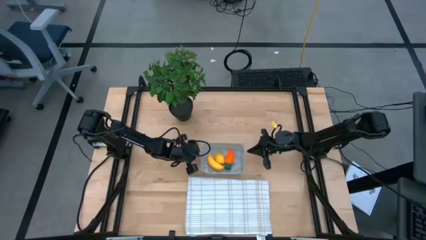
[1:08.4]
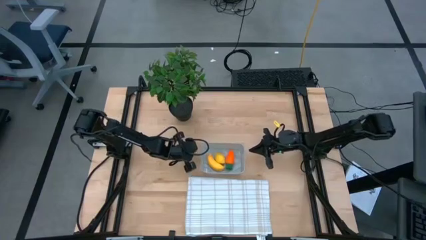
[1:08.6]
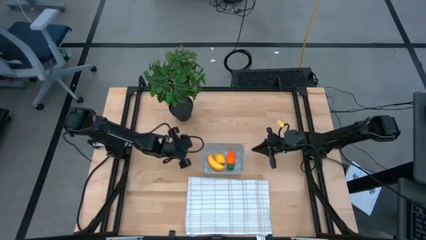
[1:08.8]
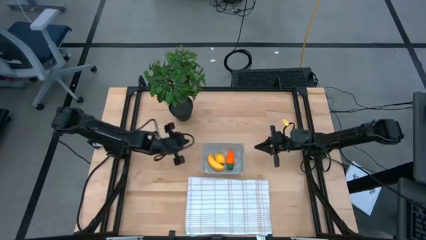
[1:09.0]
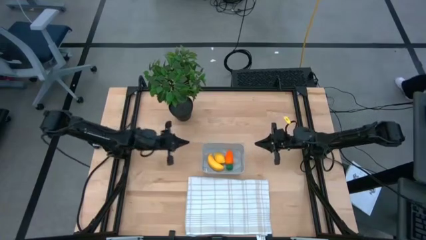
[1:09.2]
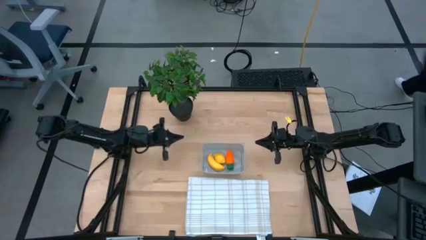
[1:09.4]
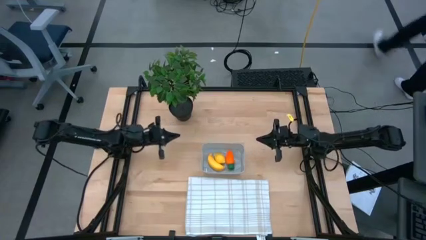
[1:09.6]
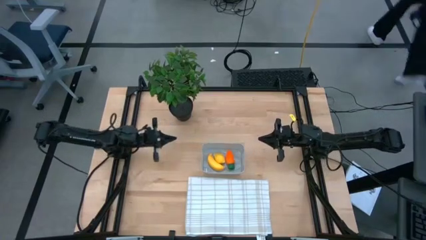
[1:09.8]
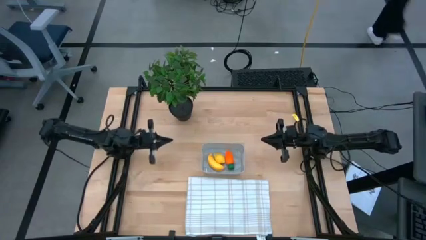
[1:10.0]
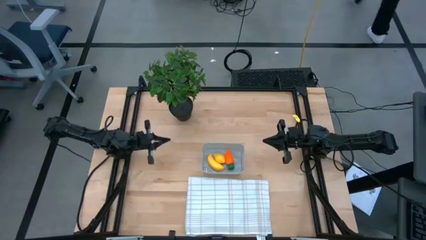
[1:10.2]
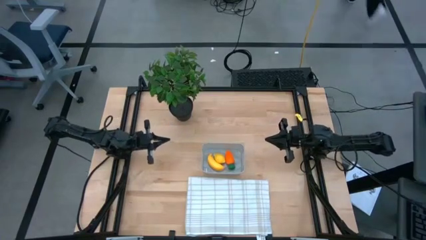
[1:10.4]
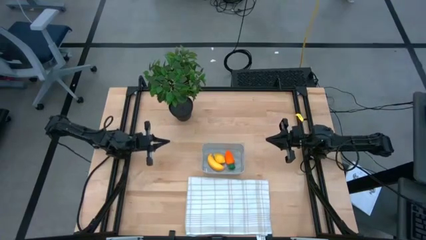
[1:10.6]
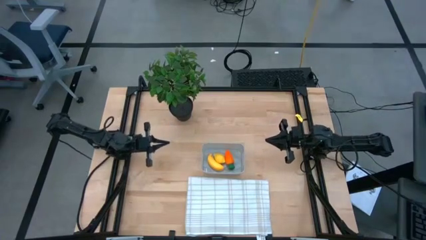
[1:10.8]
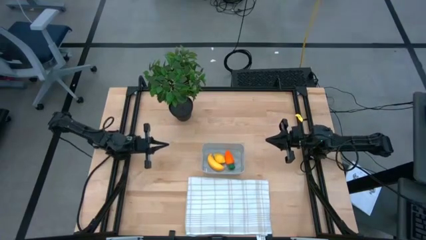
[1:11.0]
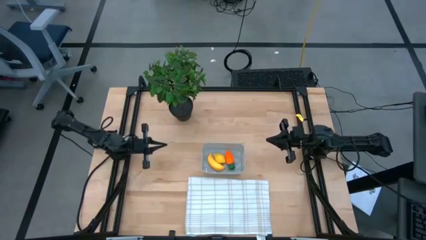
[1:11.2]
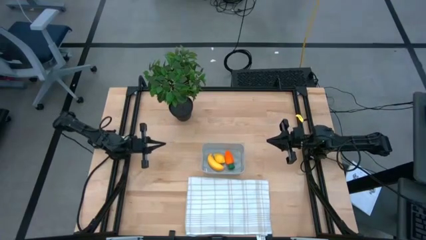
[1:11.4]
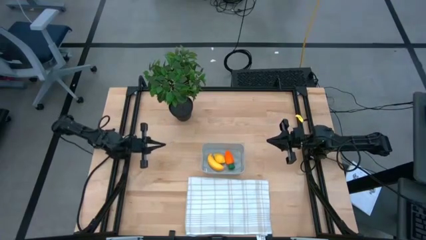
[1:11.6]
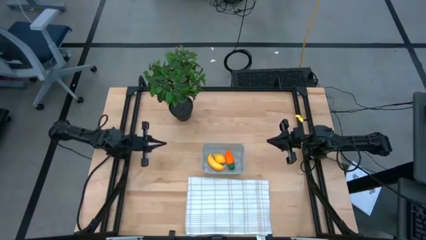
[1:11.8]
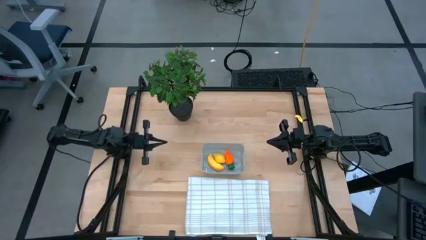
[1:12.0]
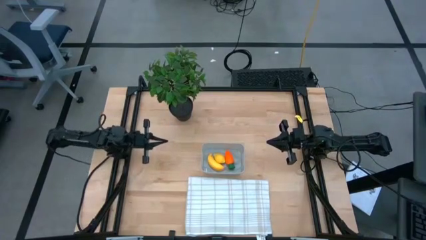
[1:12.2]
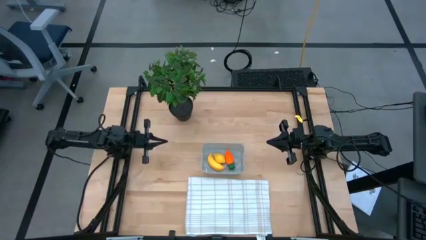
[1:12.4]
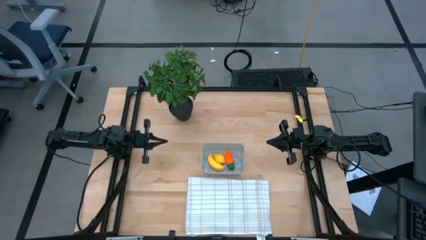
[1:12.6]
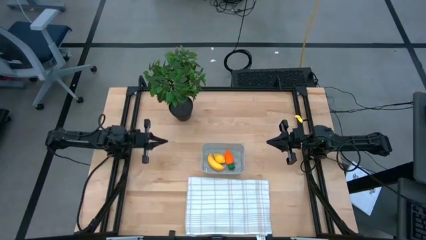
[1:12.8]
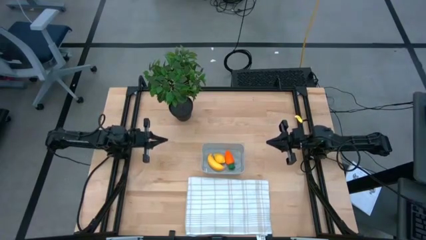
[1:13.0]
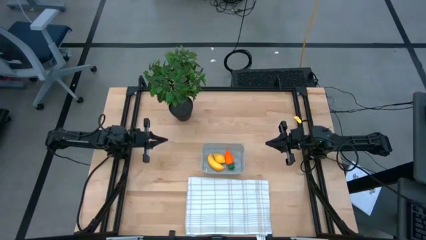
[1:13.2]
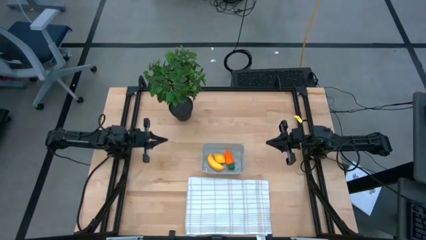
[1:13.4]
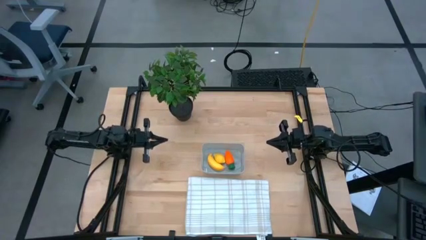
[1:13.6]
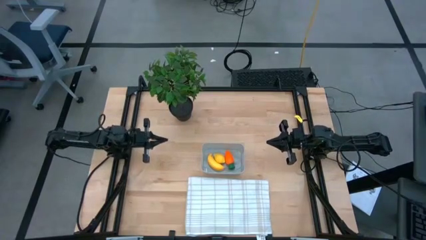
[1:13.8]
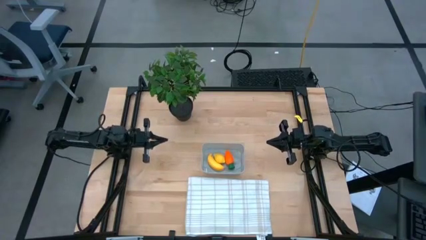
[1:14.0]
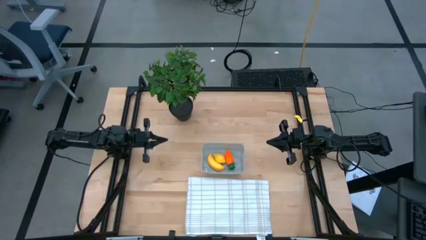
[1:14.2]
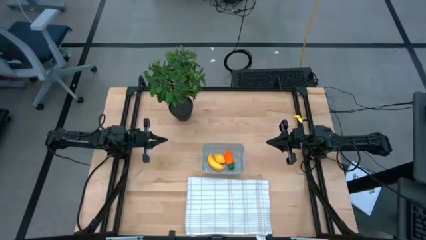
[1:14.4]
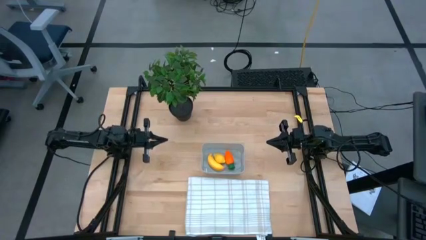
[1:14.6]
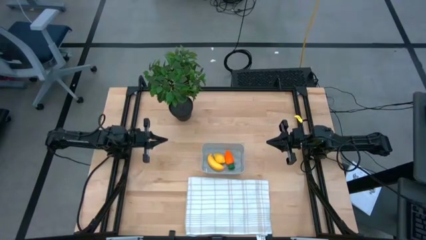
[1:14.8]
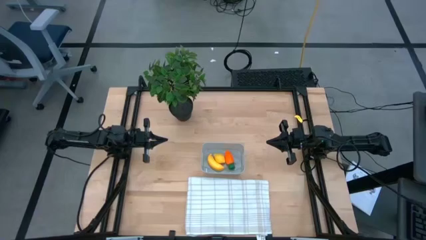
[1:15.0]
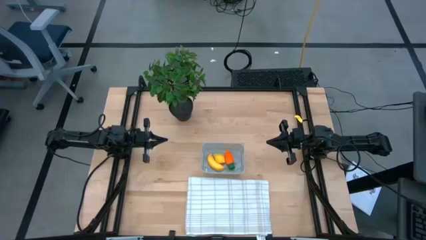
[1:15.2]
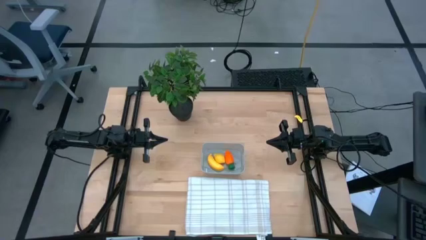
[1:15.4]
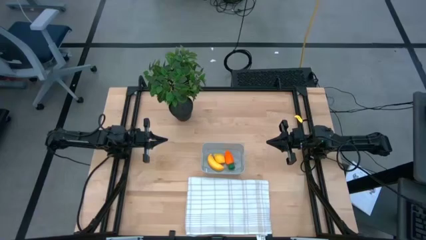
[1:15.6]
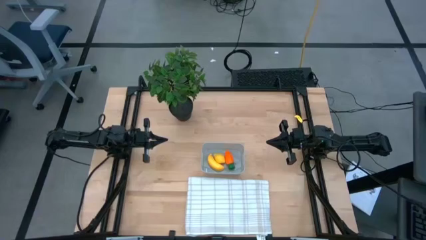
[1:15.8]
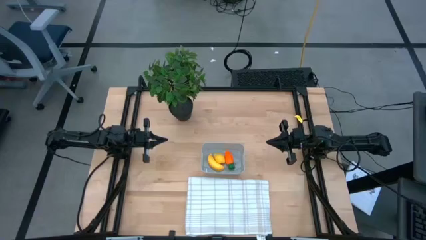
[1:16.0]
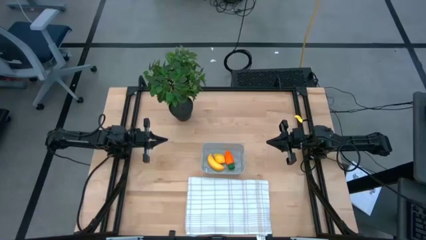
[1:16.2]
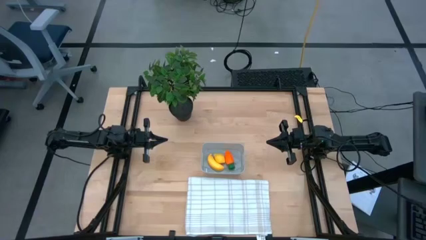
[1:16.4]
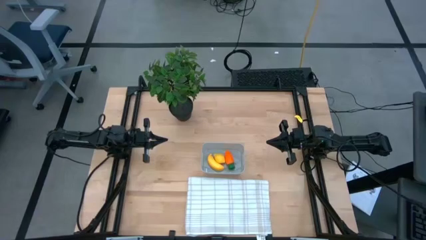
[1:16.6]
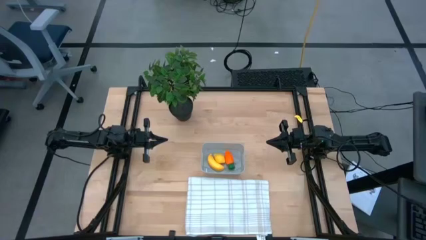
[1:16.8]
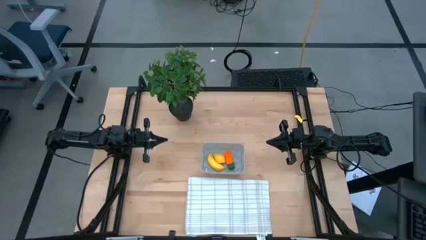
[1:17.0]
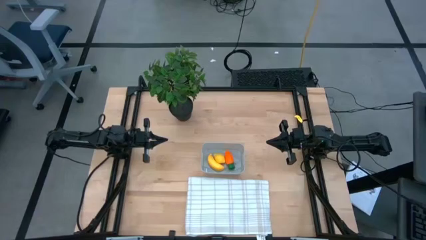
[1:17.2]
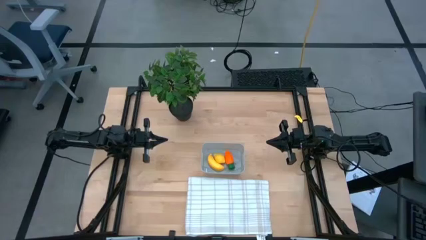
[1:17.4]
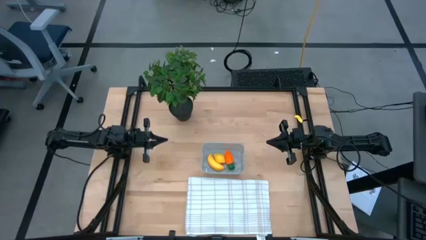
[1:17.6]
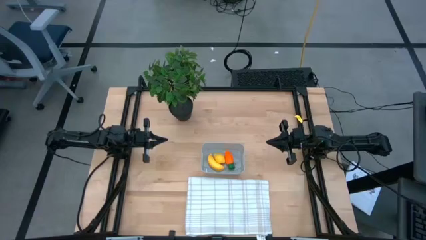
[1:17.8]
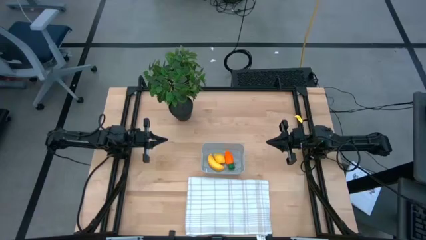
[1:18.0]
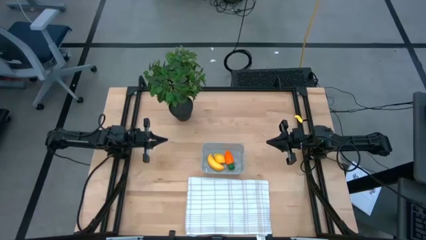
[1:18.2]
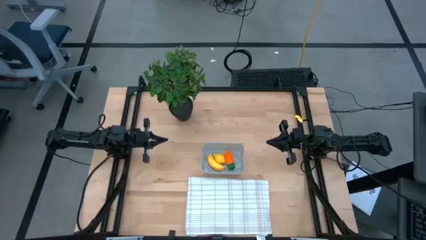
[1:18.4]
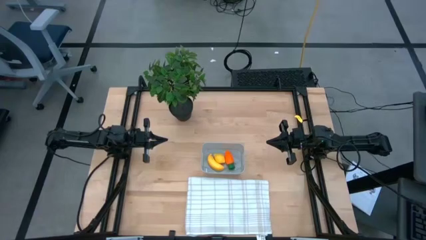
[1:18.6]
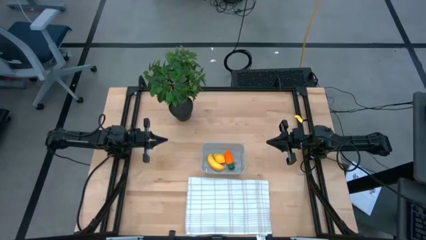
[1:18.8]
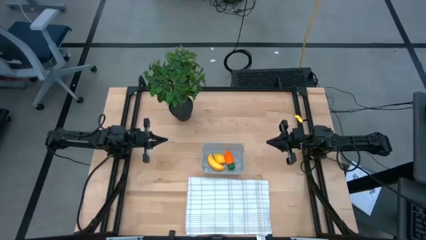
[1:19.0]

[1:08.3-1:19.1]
Task: Pick and placing Produce into tupperware
Return to Home Position

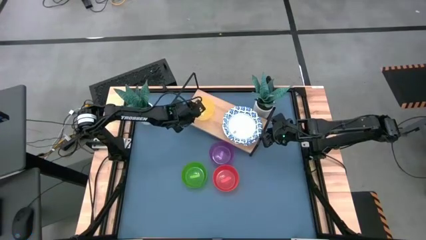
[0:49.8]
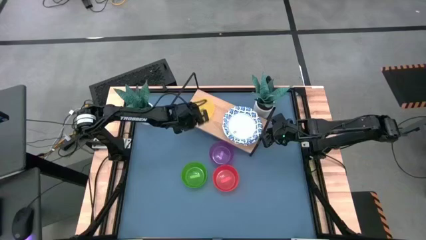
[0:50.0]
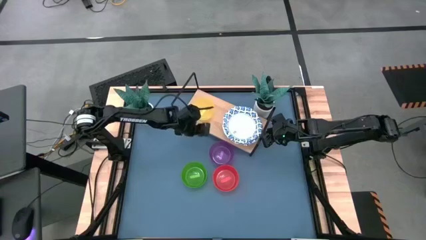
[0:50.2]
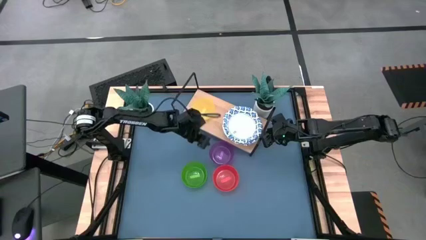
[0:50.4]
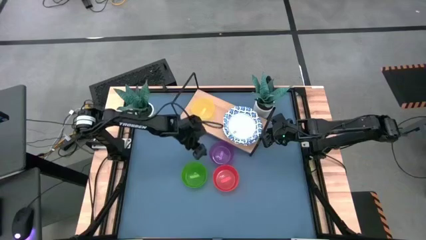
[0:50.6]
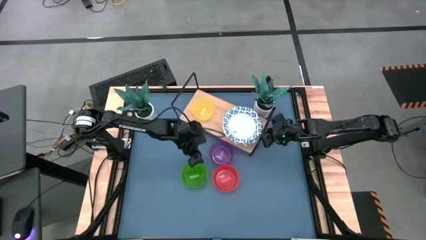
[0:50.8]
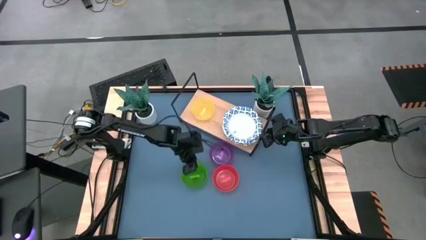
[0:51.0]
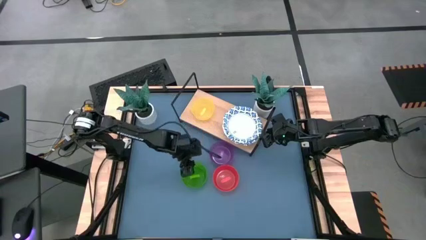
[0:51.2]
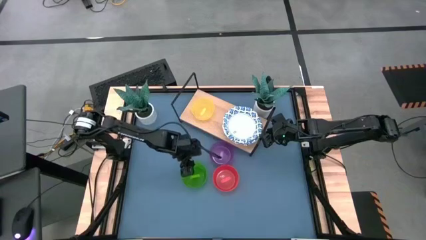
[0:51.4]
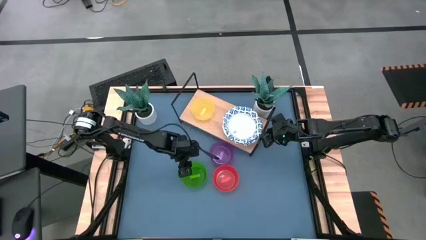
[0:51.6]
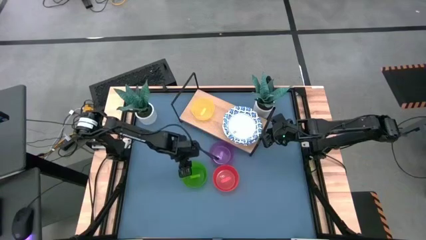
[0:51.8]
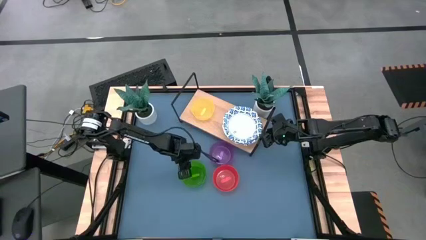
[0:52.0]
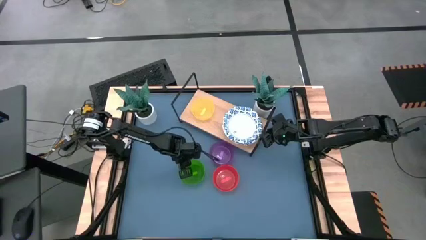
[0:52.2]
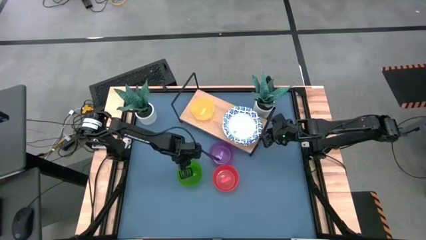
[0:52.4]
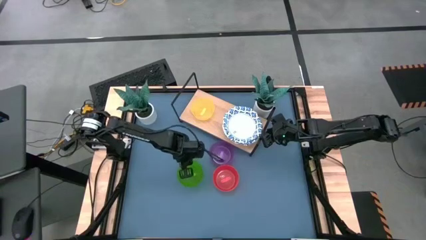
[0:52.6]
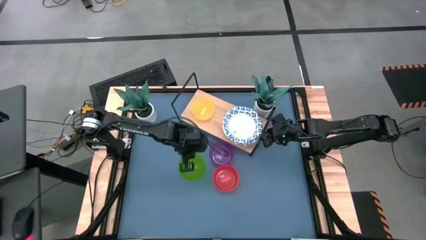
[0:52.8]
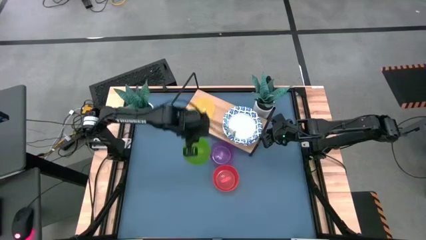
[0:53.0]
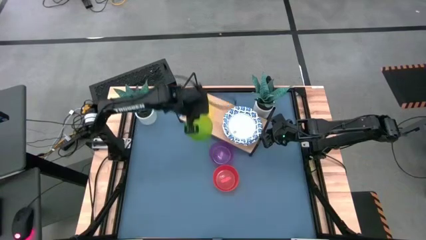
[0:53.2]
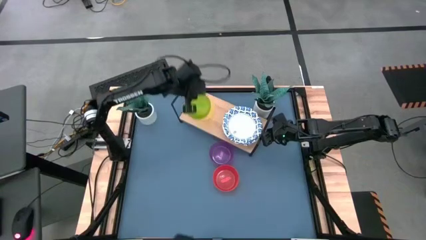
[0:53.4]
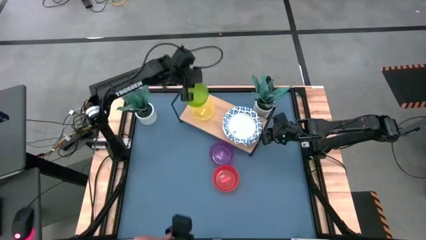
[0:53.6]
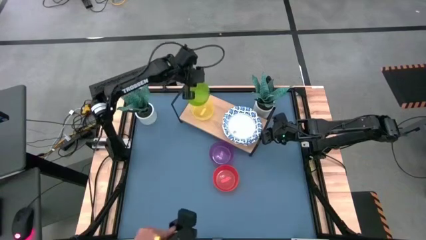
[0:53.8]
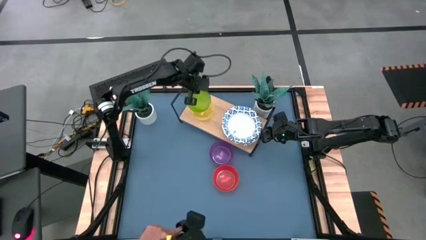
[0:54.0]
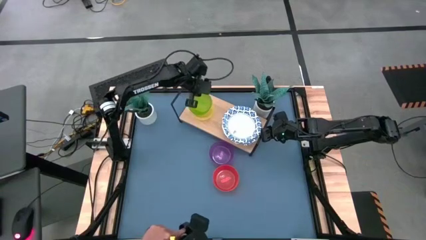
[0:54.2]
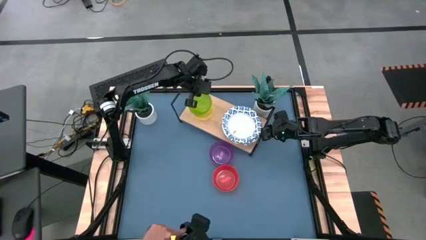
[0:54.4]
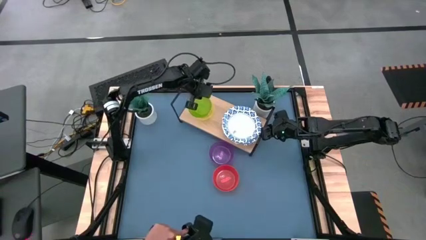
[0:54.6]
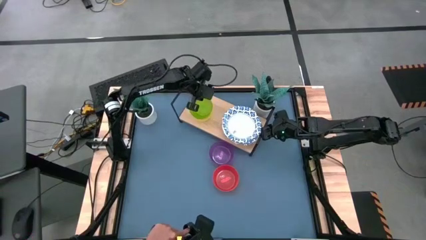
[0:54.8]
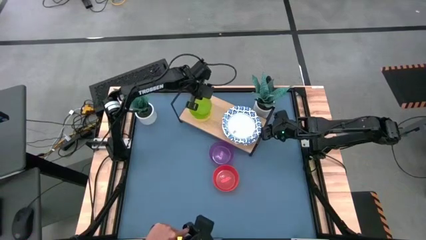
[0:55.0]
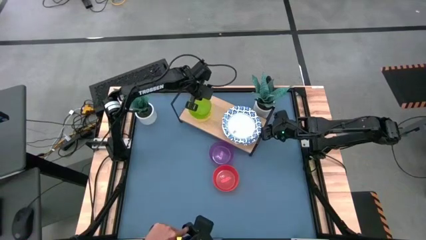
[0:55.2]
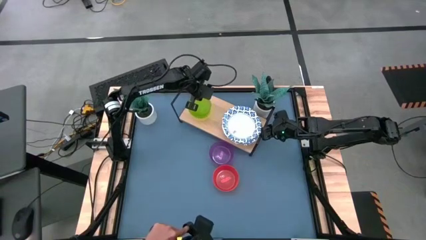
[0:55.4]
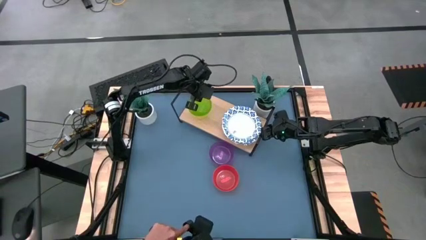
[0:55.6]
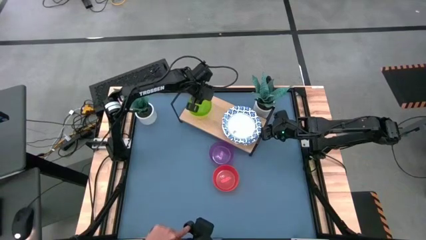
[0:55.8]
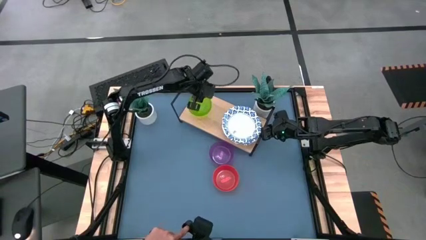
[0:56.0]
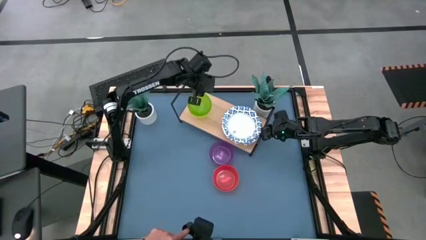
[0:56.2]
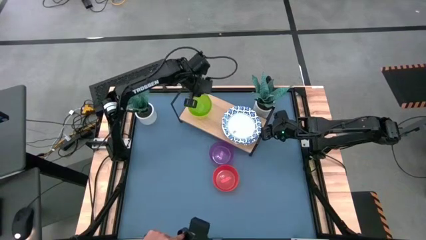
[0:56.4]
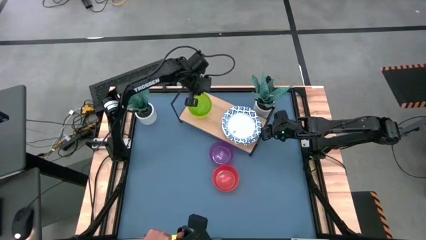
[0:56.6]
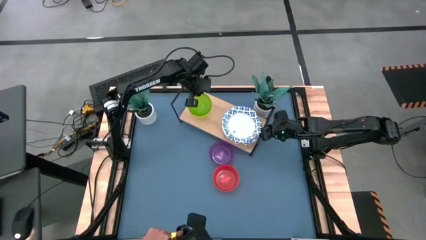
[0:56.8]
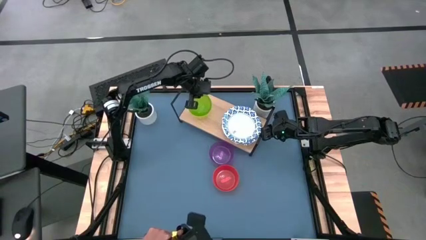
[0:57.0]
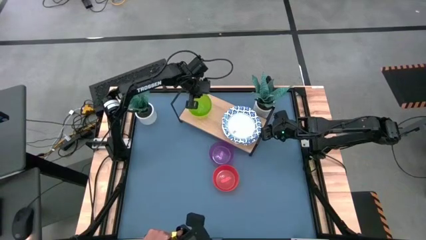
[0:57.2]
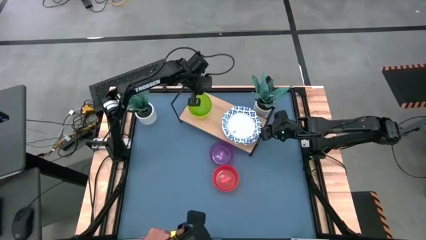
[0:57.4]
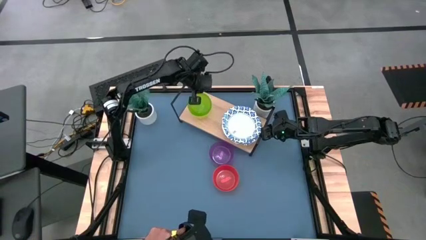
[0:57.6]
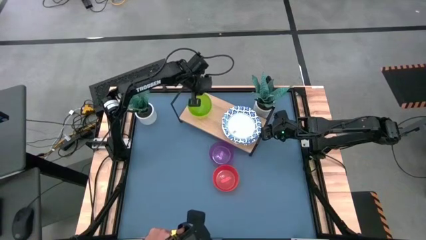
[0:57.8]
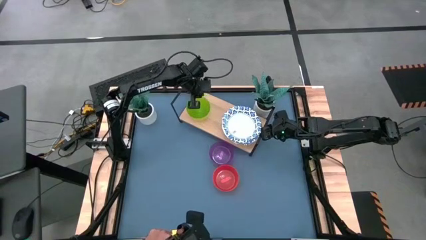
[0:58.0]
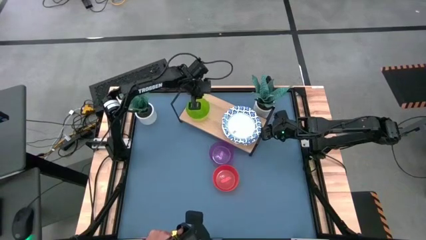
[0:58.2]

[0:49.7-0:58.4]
Task: Place and stack bowls onto a shelf
Stack the green bowl on top of the yellow bowl on the shelf
